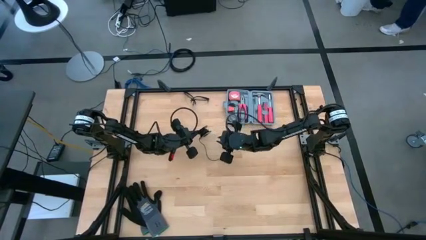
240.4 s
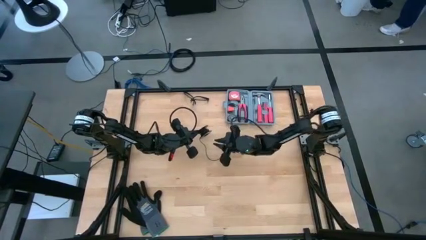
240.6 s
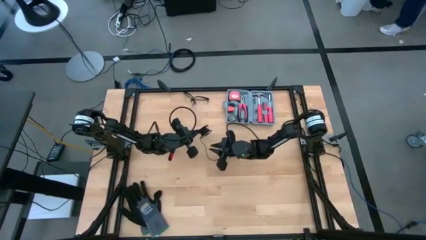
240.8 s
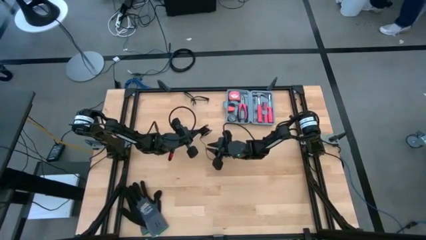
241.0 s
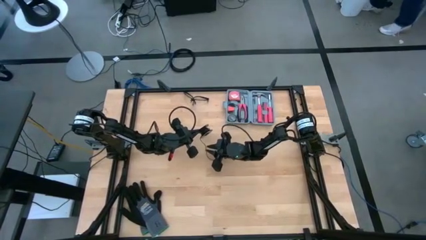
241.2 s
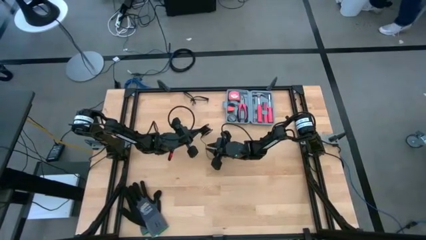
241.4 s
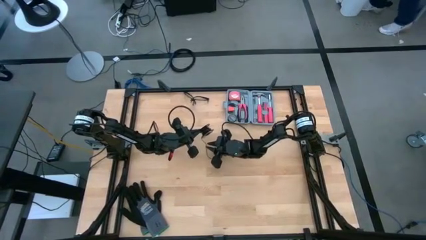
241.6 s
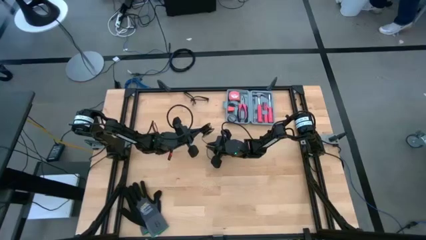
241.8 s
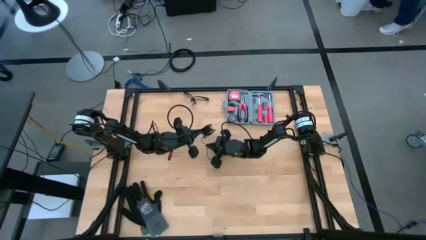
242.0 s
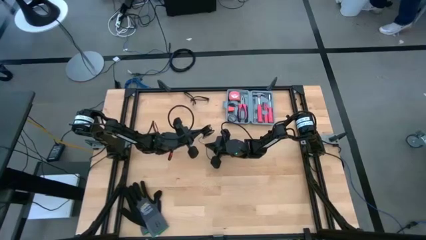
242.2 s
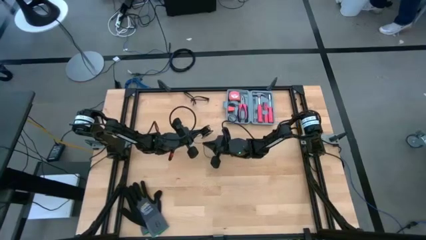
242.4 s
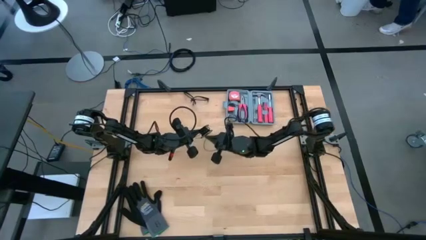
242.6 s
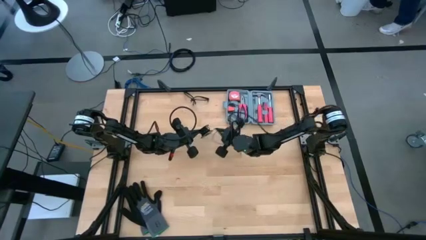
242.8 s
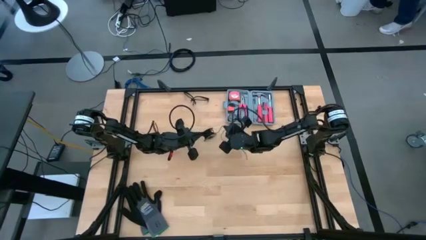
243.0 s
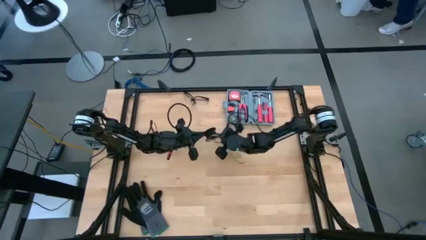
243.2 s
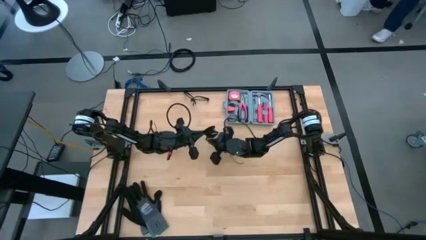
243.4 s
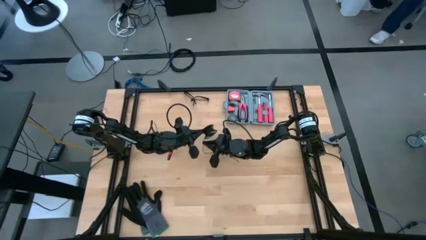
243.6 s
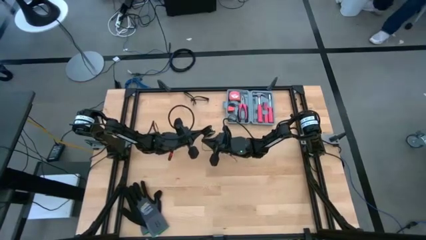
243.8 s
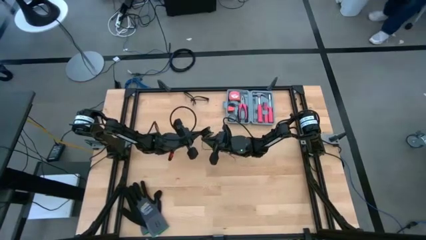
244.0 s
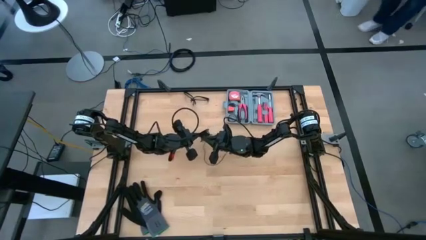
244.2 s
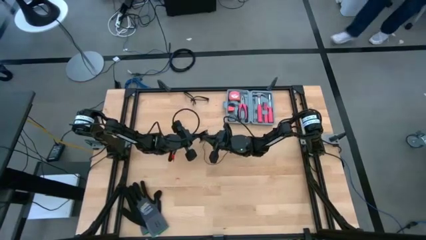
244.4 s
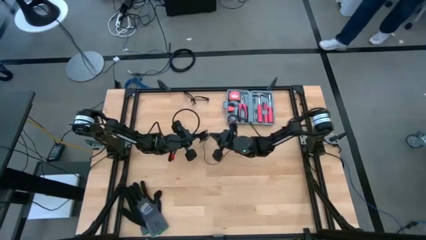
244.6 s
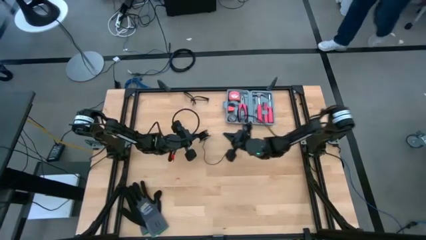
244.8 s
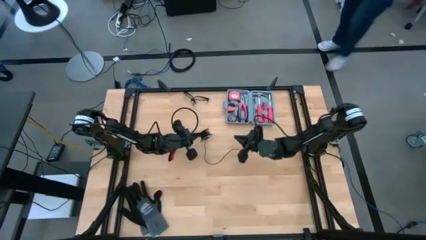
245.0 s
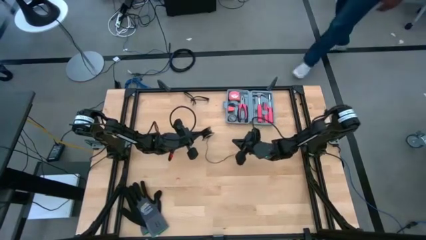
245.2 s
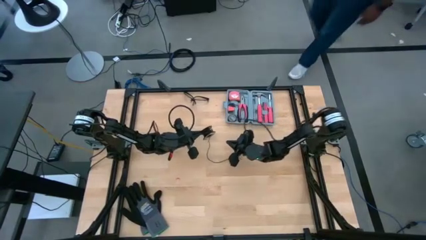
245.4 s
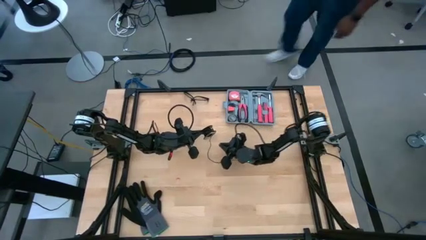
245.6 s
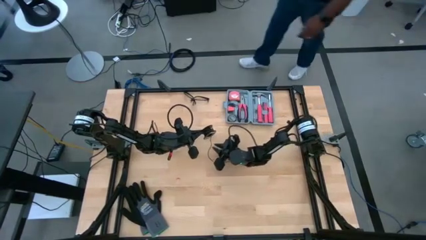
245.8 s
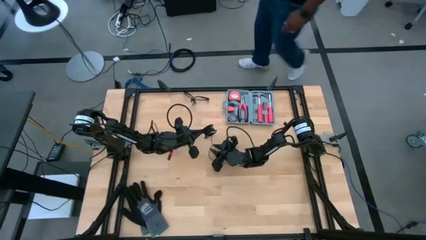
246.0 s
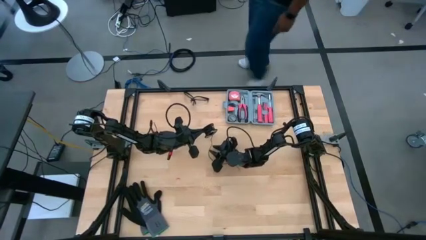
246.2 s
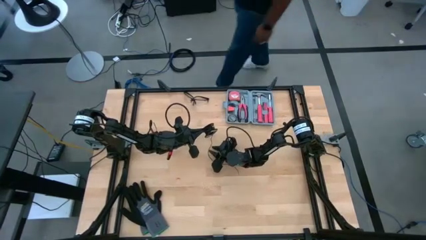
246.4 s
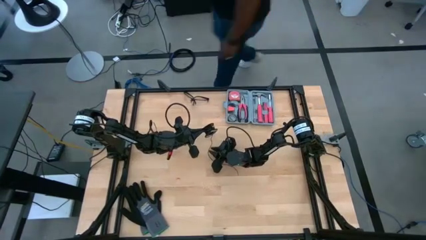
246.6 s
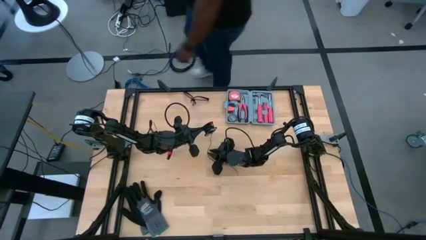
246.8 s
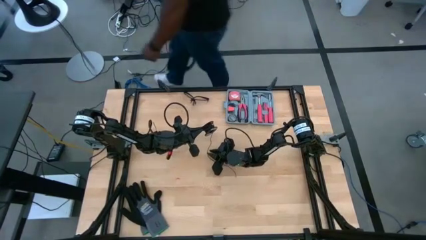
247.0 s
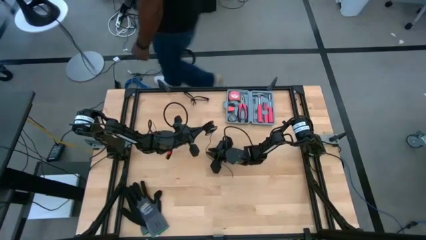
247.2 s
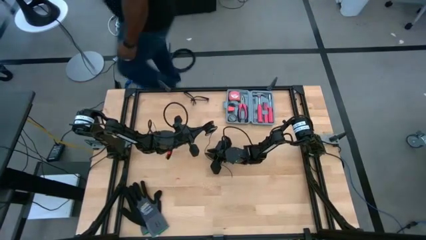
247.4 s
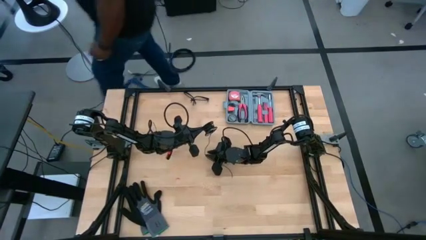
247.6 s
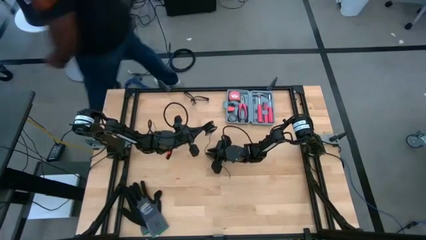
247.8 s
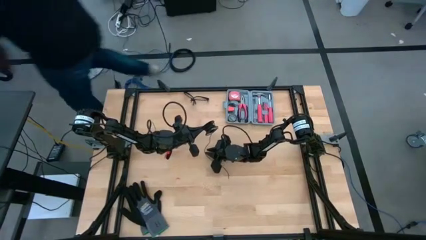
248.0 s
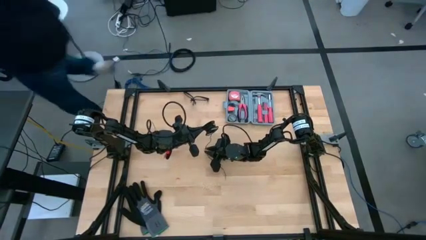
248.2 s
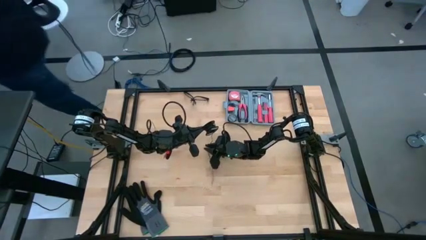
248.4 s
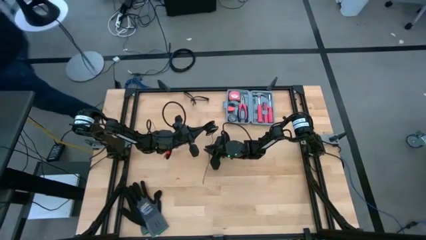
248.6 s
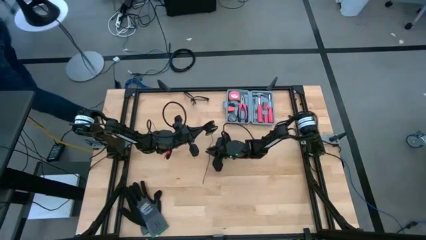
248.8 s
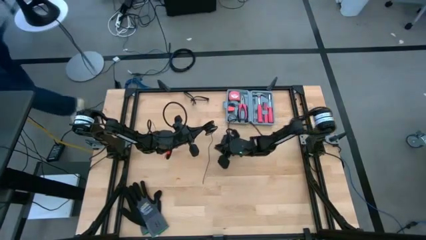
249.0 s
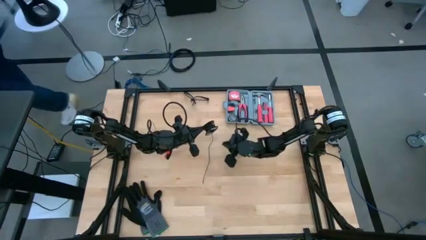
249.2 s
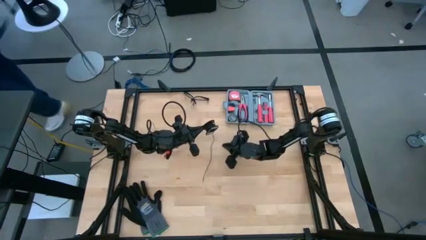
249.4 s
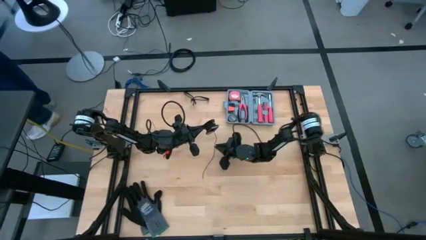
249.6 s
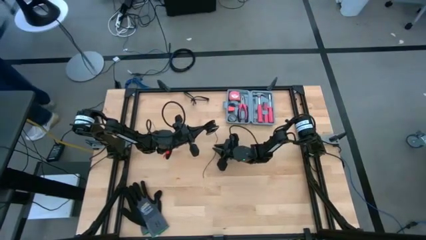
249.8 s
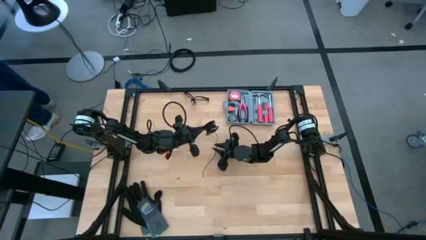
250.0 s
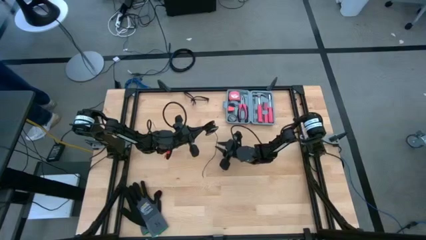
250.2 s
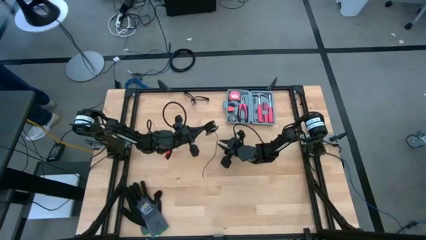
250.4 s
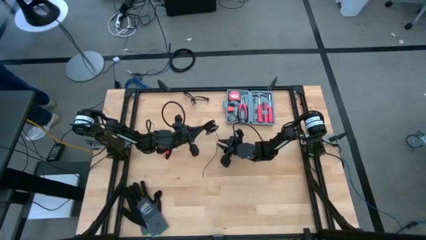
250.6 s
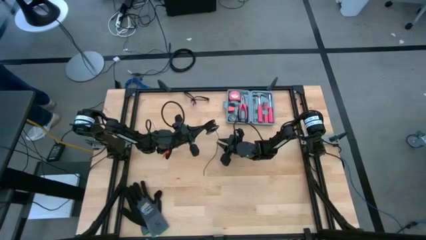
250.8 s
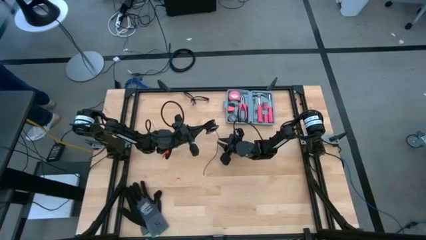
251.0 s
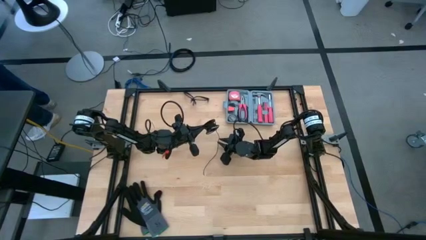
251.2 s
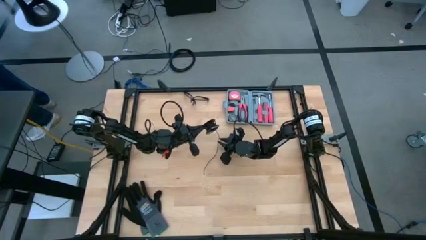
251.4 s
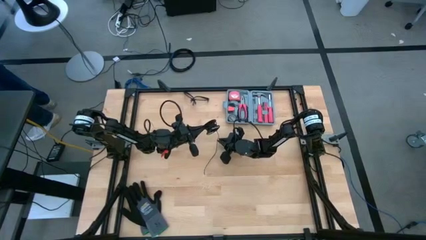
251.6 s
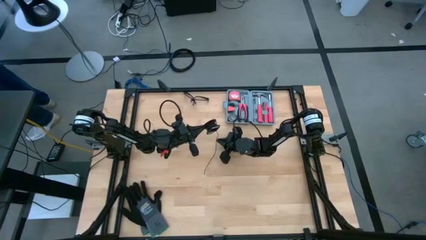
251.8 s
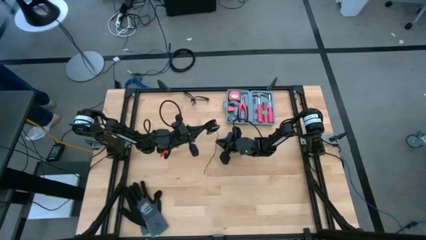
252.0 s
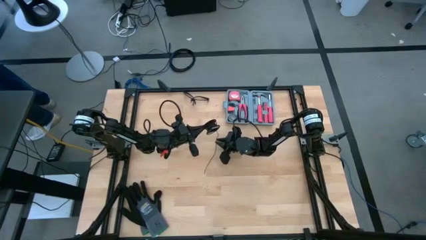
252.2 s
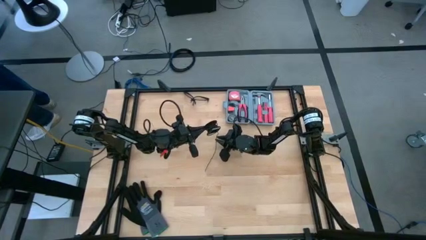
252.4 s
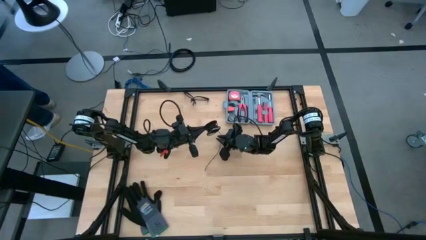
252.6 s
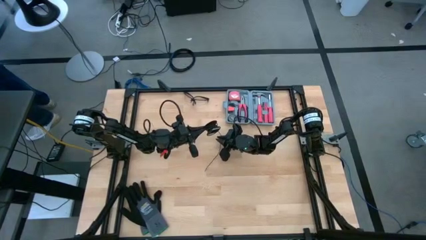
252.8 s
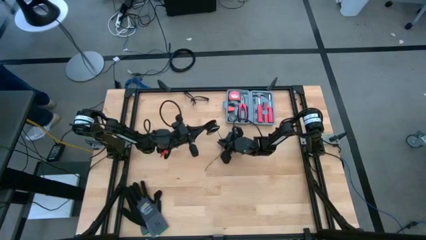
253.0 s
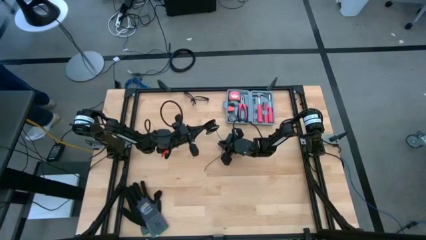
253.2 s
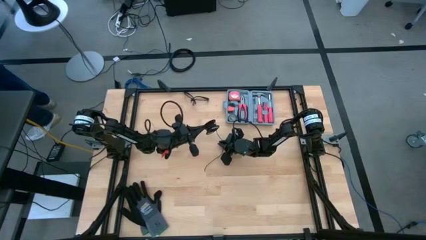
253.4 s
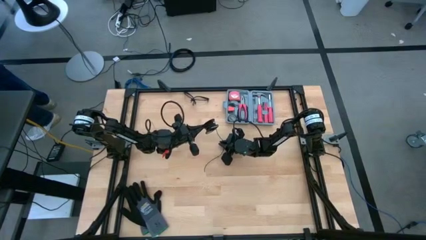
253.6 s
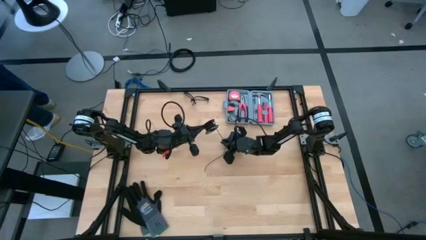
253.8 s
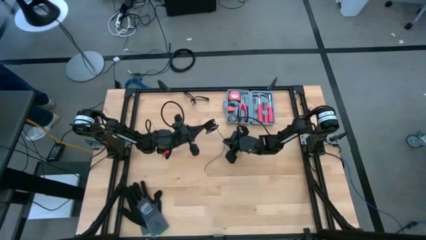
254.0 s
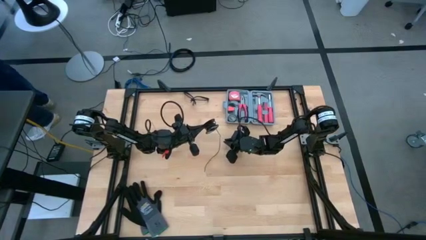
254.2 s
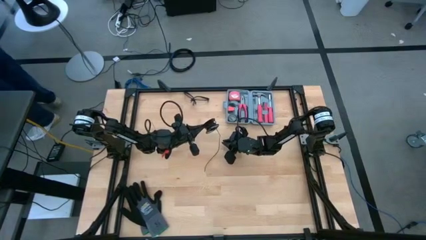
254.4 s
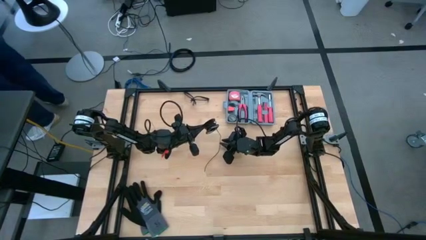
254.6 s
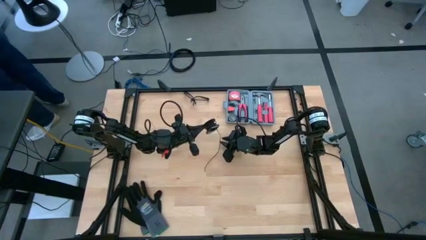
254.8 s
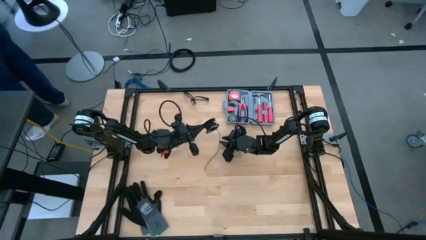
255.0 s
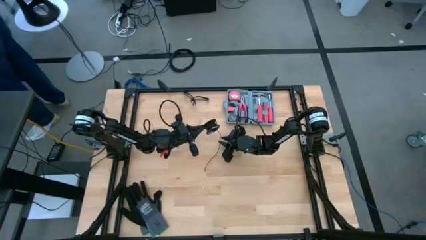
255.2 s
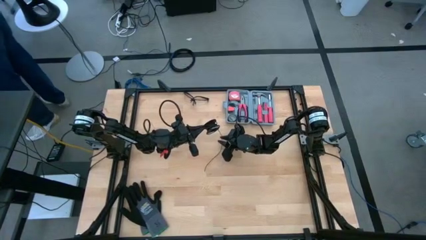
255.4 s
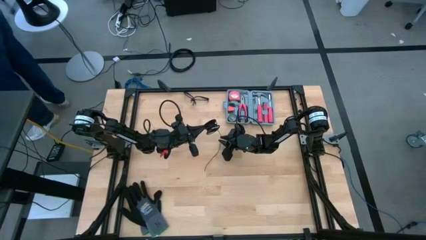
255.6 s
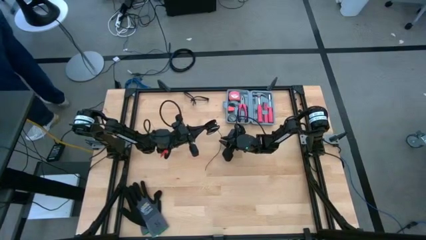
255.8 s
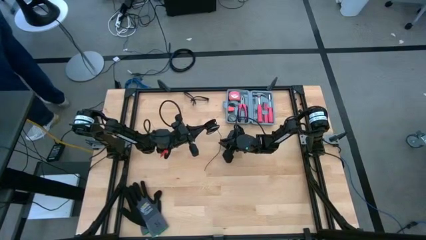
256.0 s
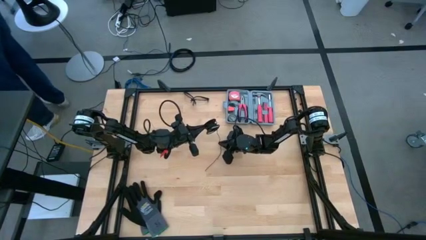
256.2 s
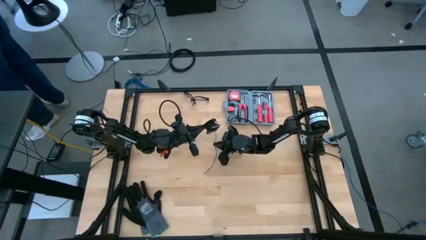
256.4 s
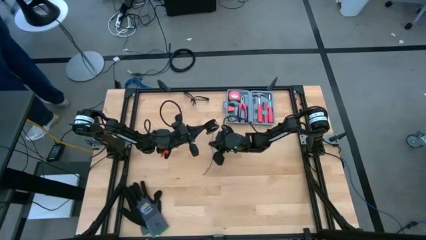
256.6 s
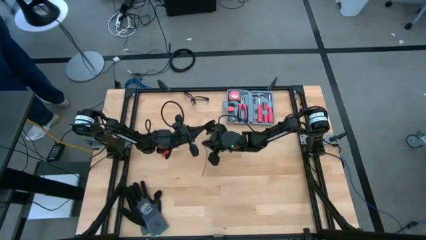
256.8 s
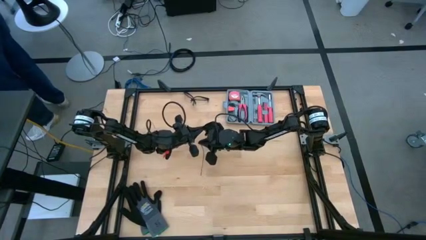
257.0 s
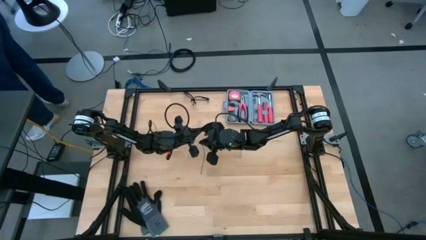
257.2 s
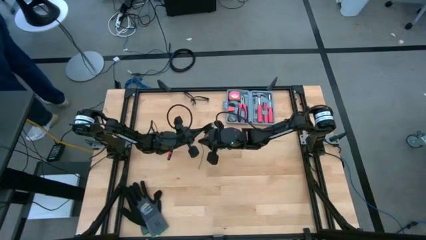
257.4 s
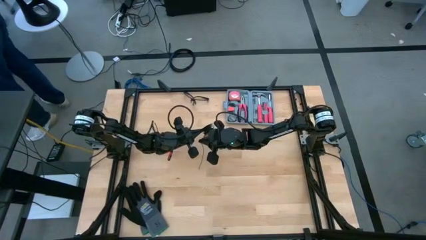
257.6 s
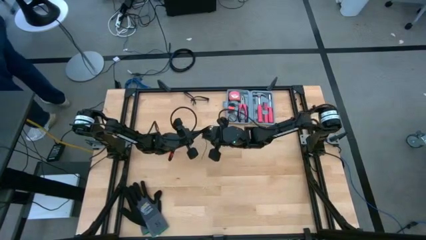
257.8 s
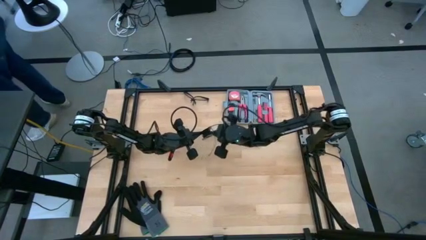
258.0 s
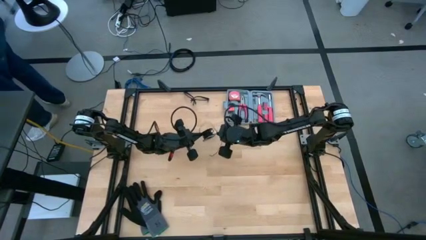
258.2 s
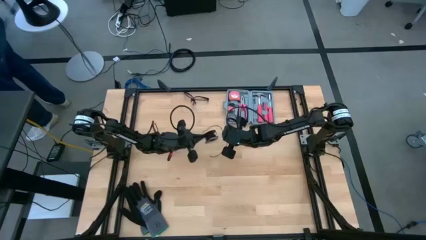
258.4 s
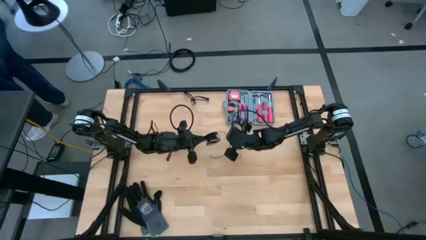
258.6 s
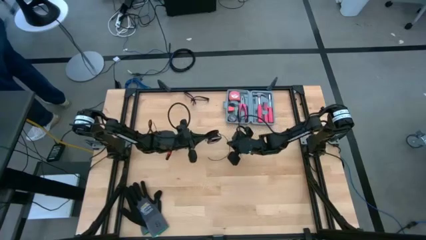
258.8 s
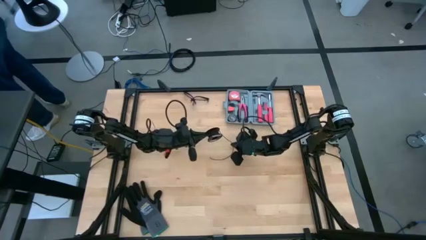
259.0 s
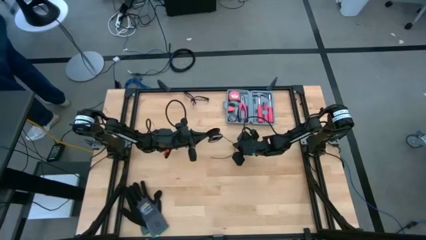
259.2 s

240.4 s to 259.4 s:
Task: Coil cords
Coil the black wire onto the spool
